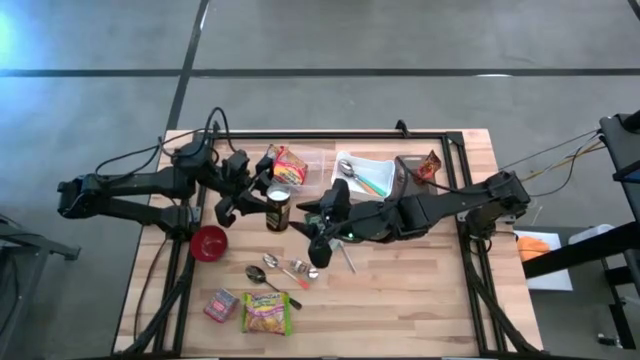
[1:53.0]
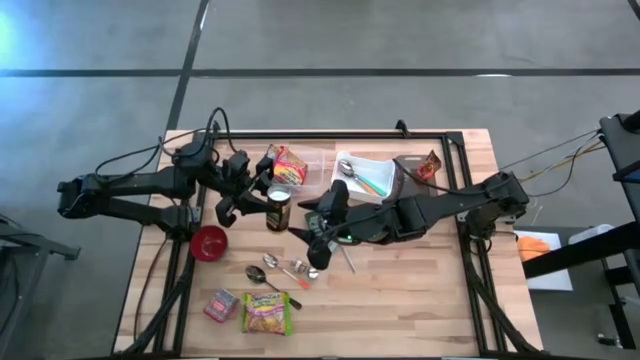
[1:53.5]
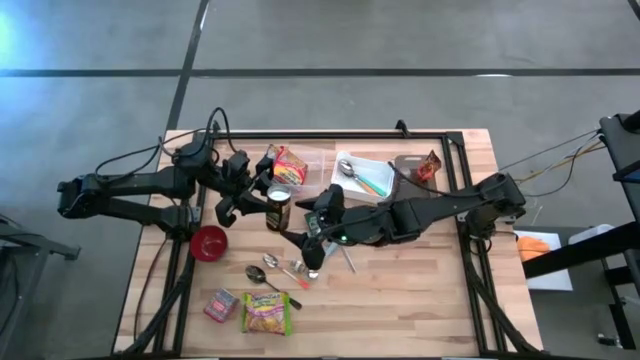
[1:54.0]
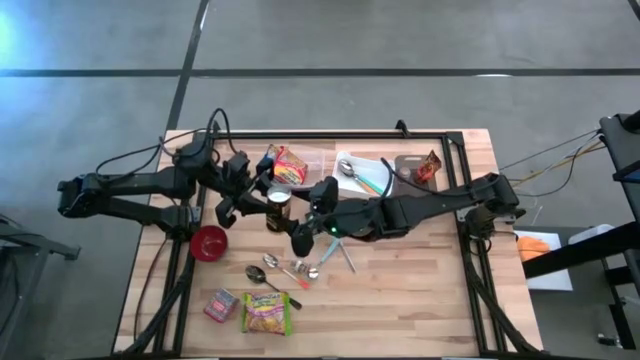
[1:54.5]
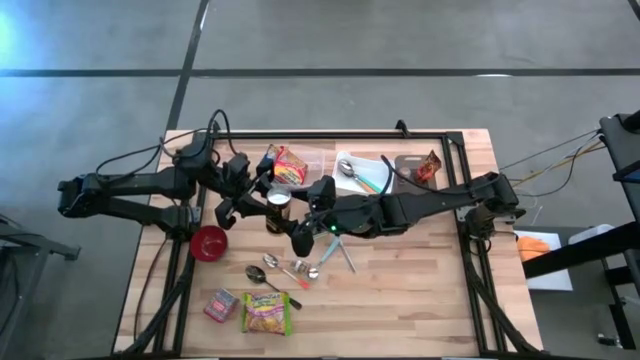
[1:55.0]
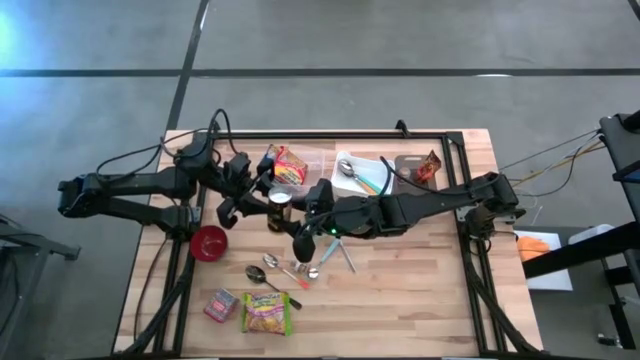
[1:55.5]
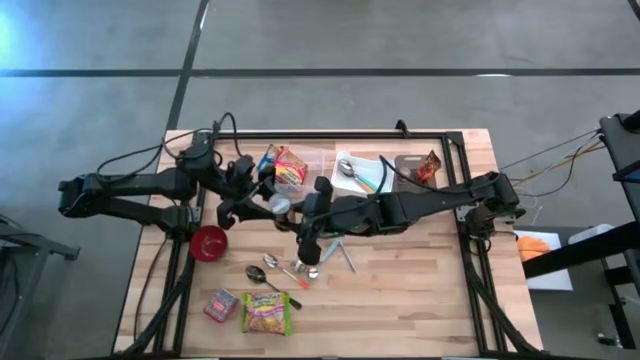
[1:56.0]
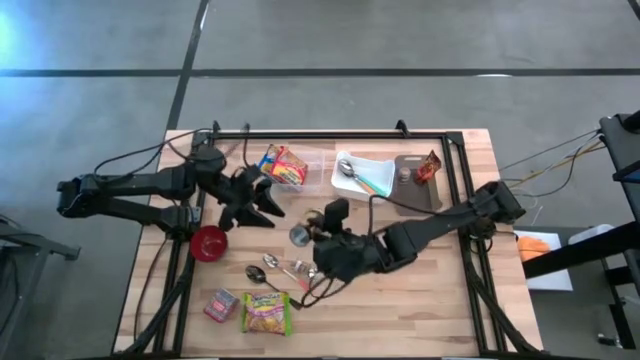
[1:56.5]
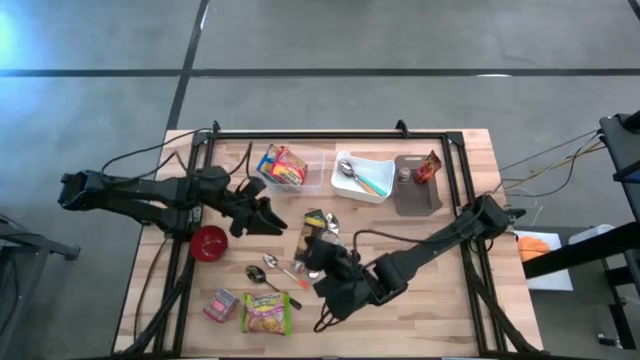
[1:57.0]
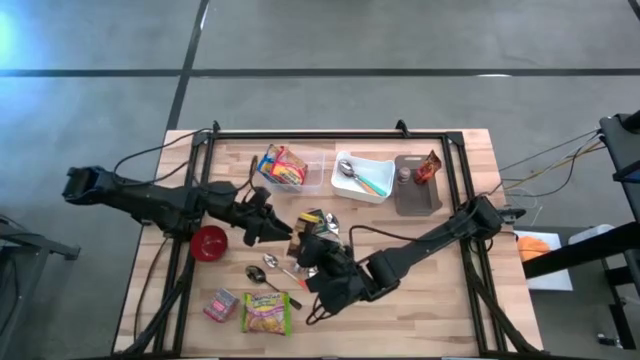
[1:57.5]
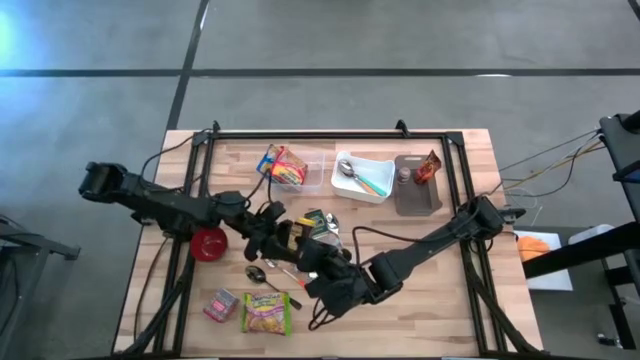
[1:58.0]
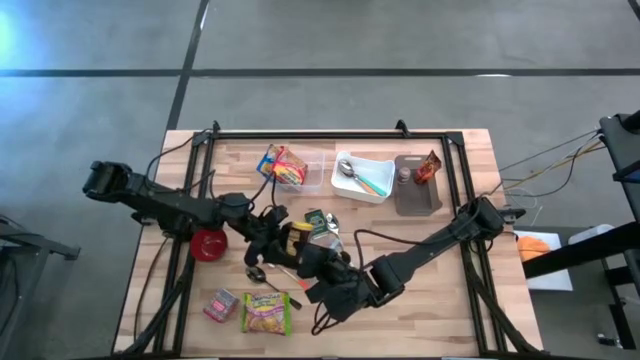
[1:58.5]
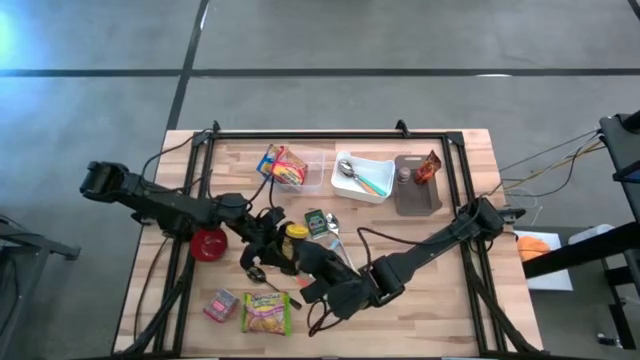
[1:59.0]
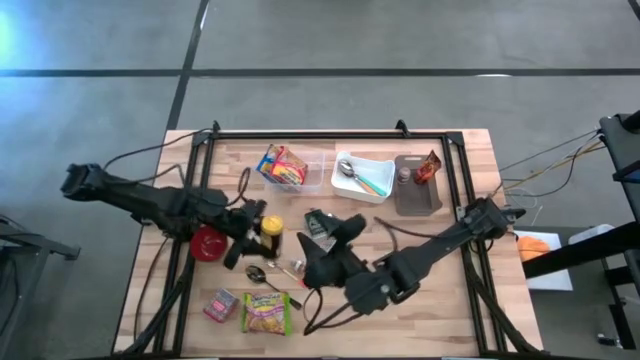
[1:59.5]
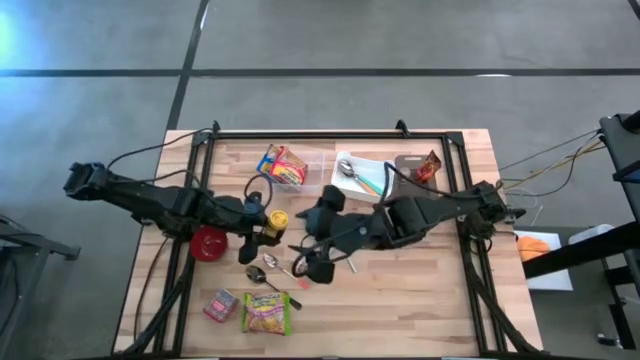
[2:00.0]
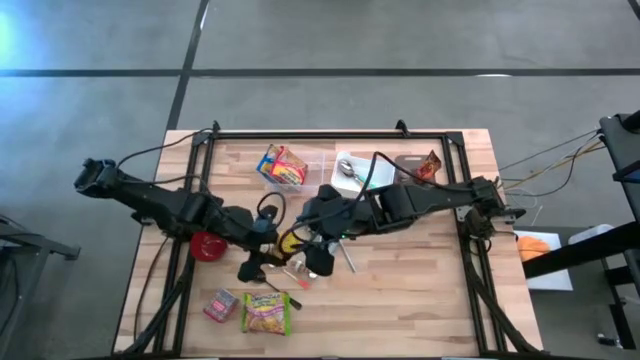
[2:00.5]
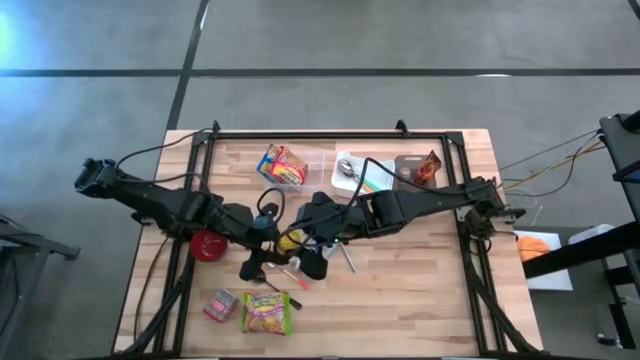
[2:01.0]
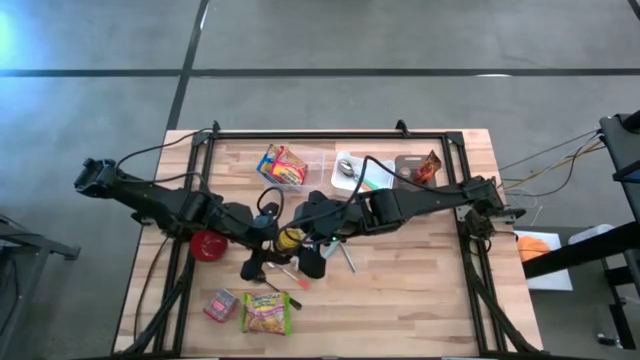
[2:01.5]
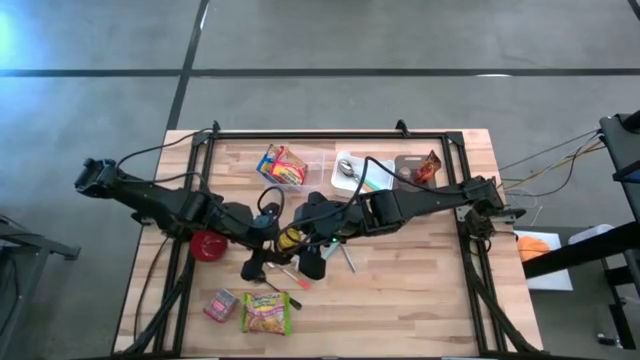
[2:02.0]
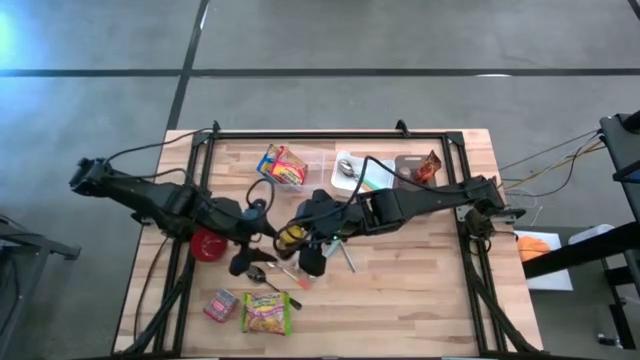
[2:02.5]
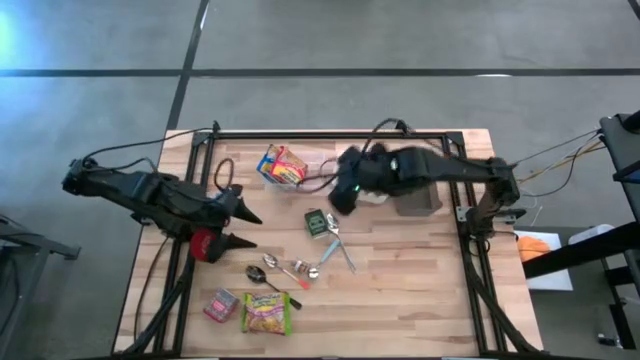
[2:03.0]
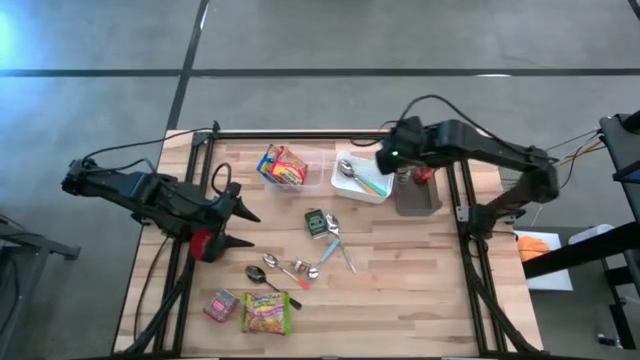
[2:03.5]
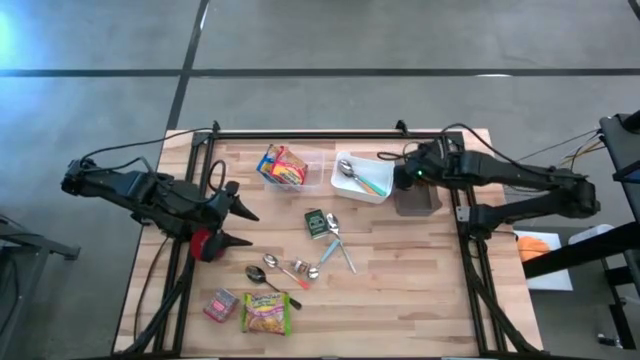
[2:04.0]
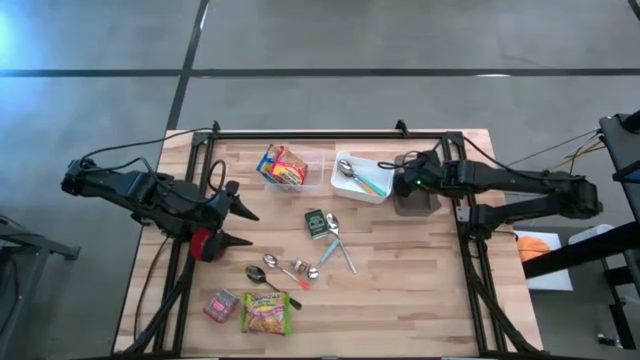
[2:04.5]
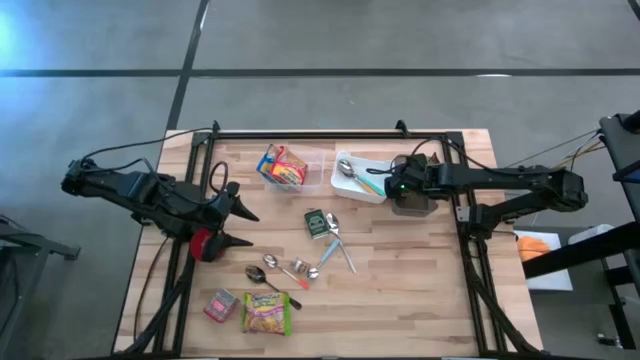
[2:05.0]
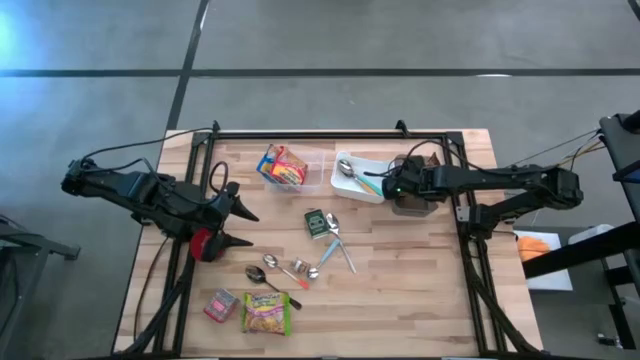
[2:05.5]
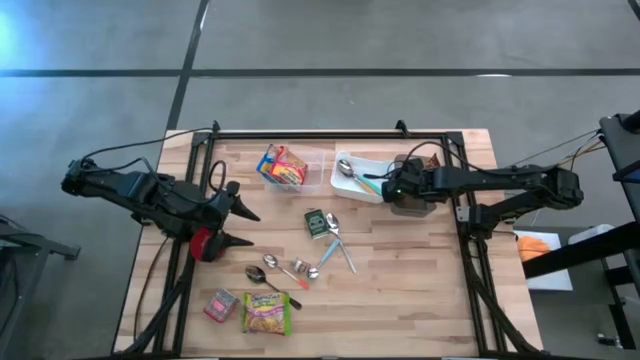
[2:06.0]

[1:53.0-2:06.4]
Put the yellow seasoning can into the black bin

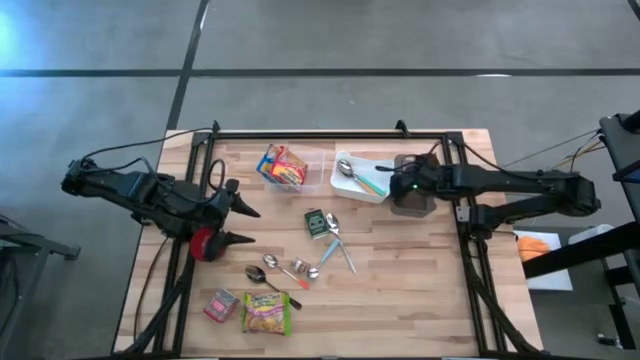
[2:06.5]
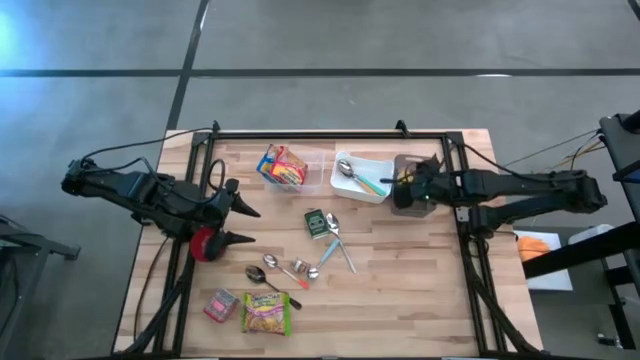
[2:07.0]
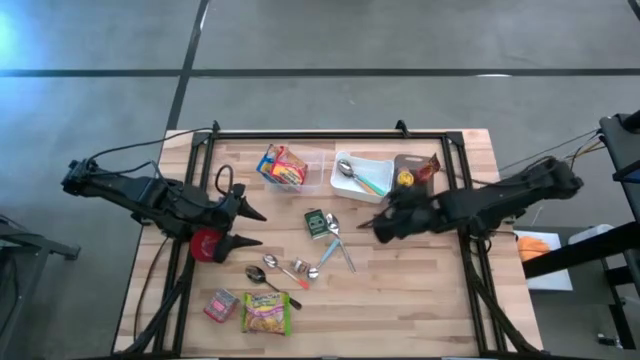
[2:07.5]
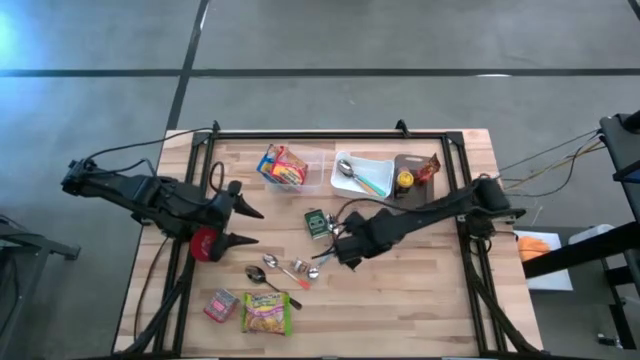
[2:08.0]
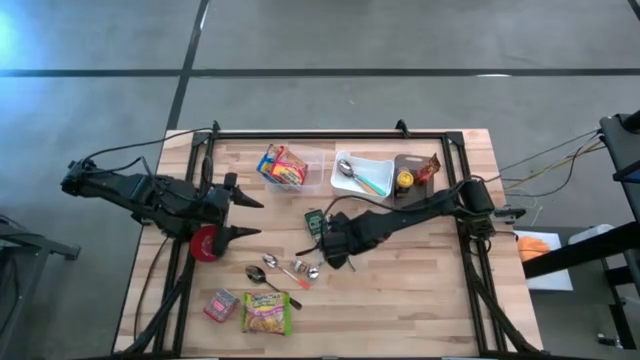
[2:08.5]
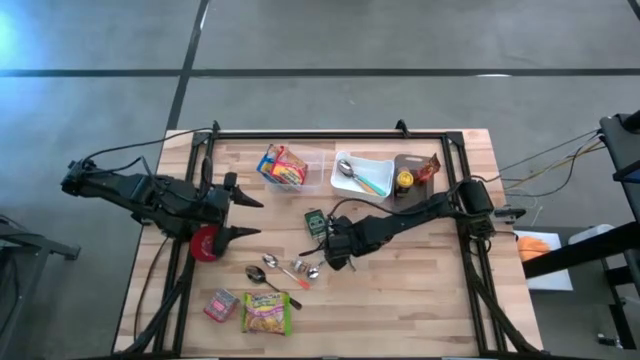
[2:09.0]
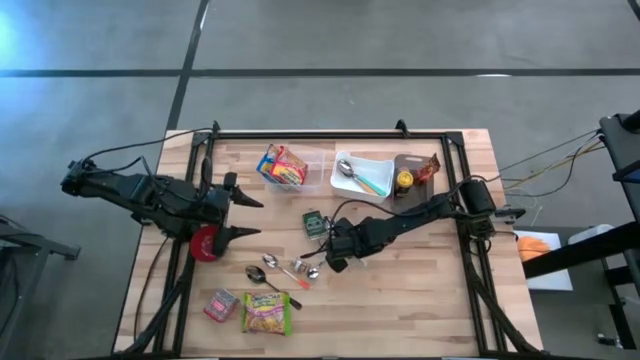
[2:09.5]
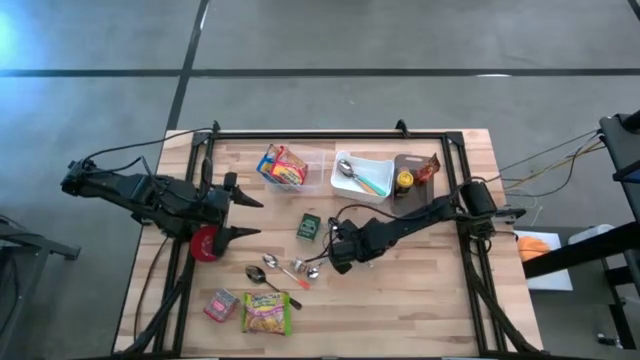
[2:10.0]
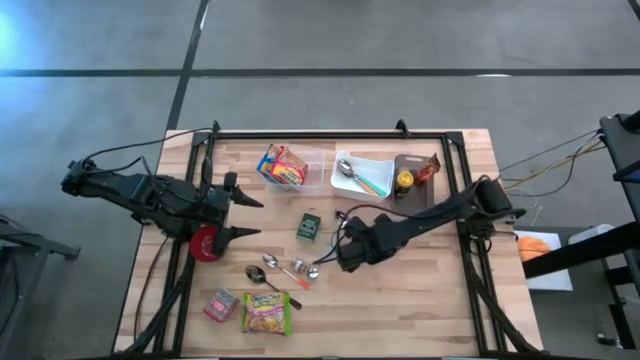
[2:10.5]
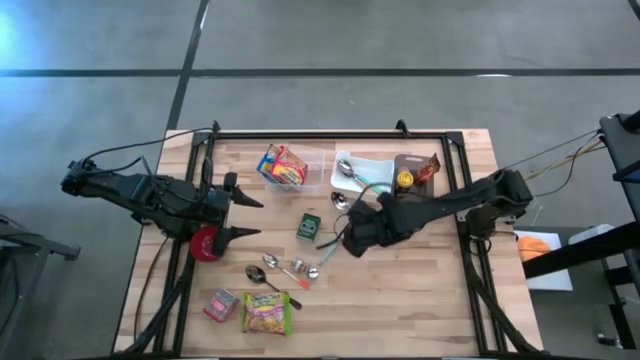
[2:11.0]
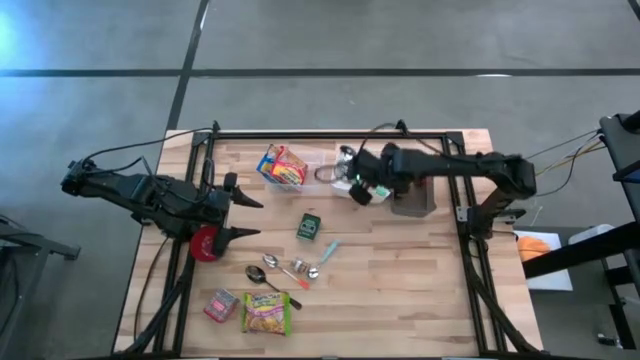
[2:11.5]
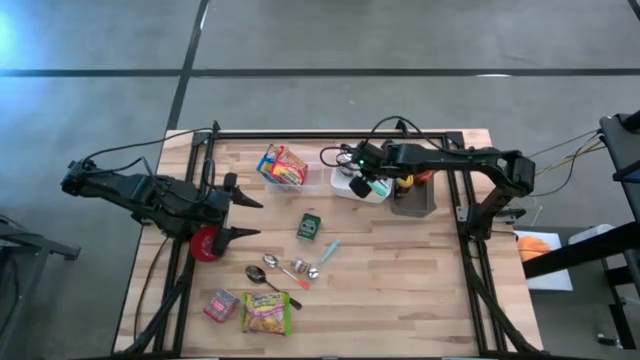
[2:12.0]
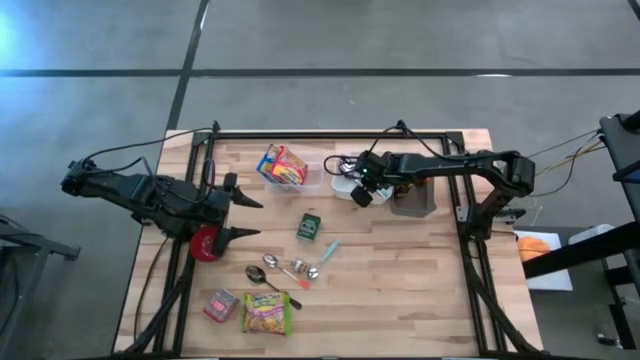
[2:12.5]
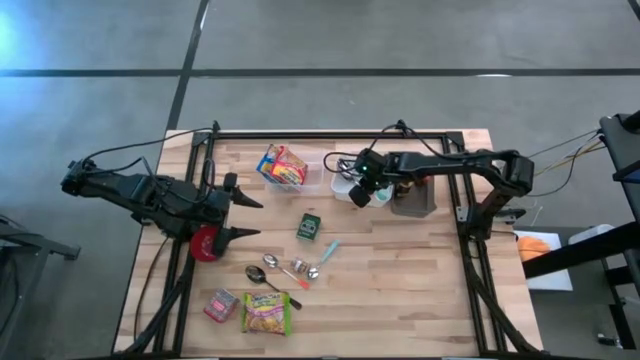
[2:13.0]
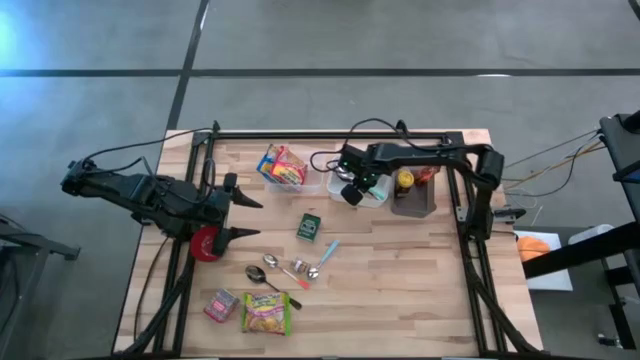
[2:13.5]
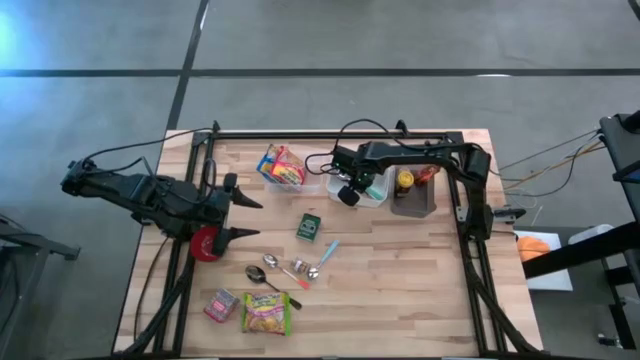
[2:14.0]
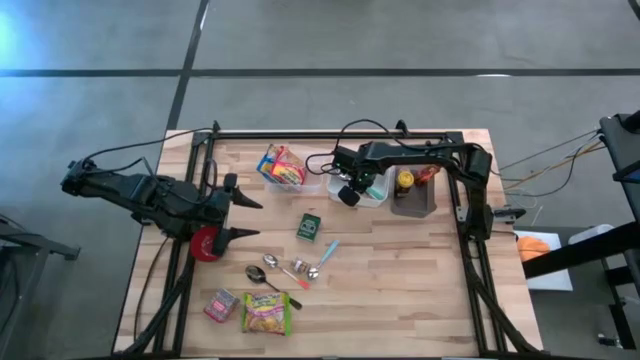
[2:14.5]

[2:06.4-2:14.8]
Put the silver spoon into the white bin
